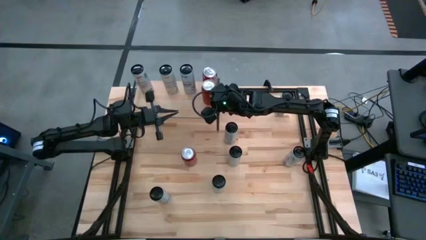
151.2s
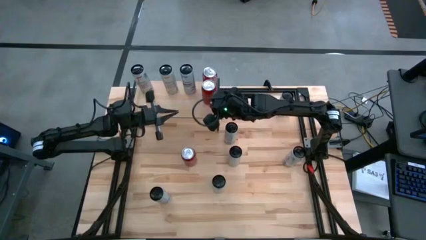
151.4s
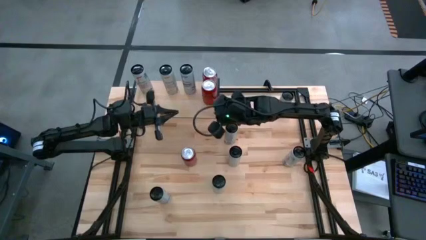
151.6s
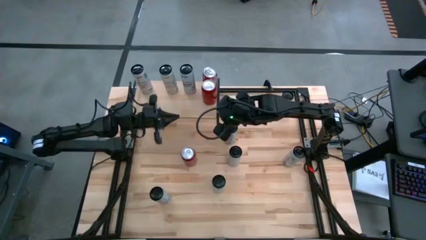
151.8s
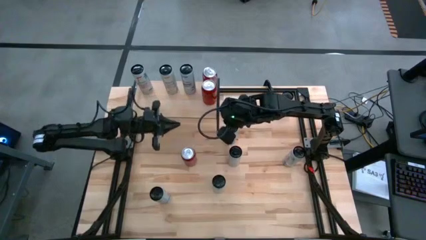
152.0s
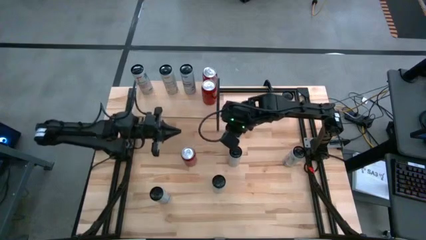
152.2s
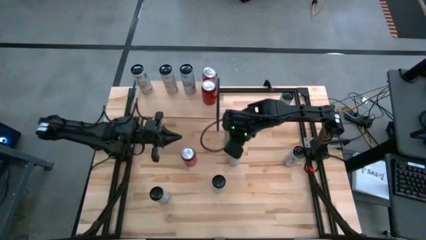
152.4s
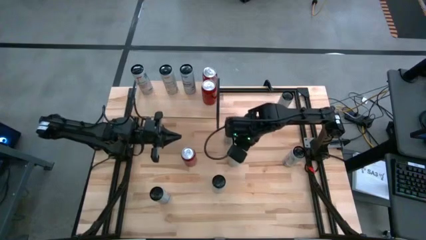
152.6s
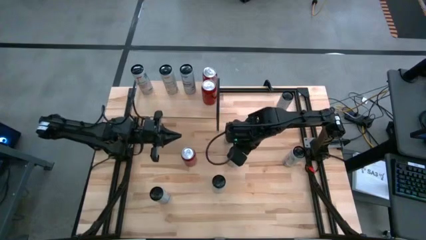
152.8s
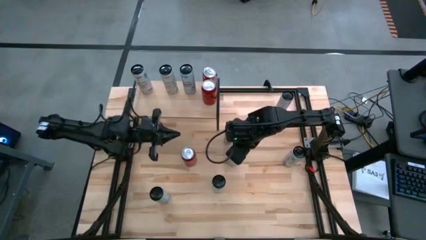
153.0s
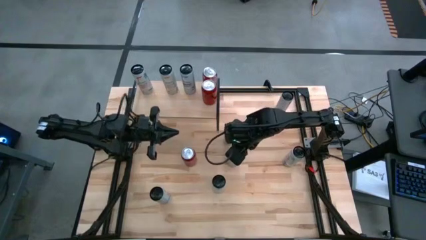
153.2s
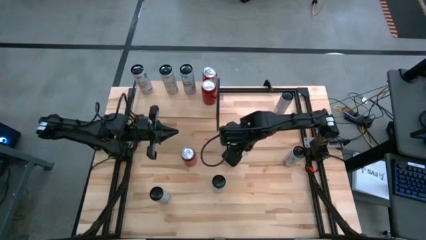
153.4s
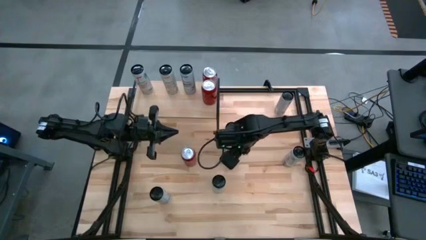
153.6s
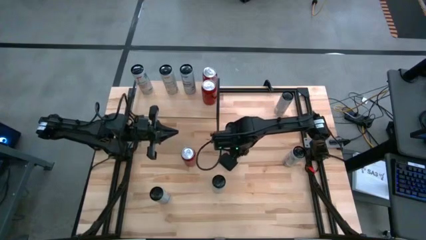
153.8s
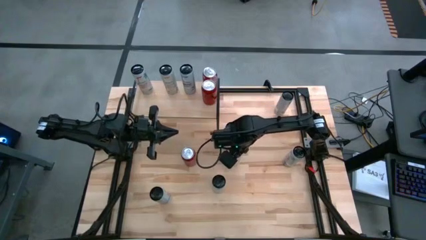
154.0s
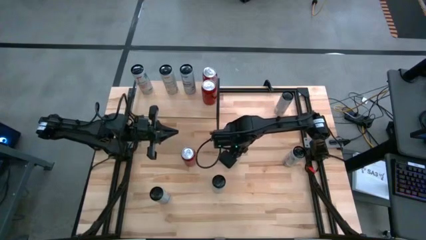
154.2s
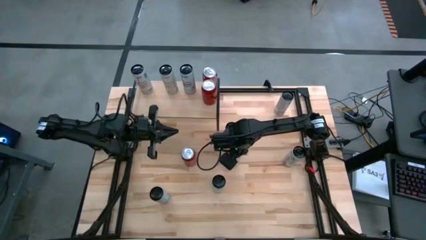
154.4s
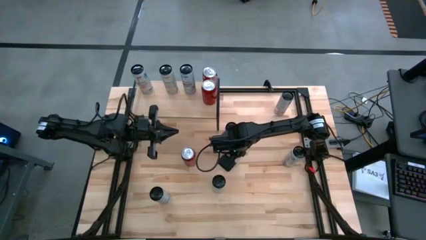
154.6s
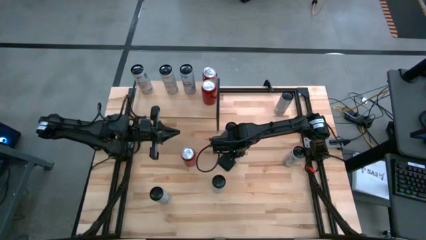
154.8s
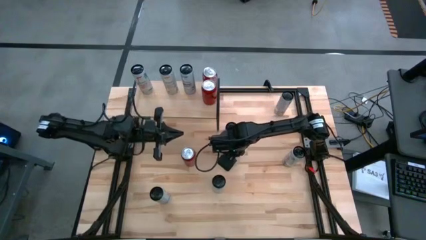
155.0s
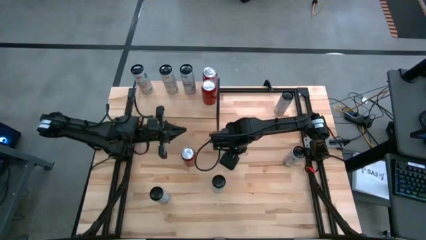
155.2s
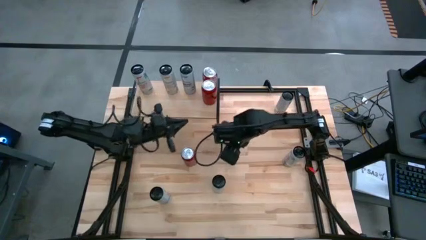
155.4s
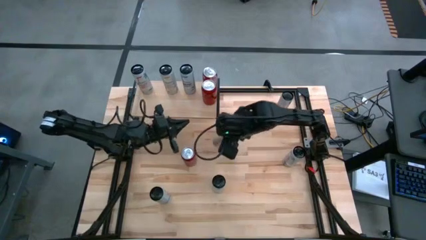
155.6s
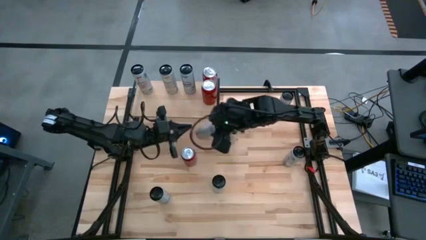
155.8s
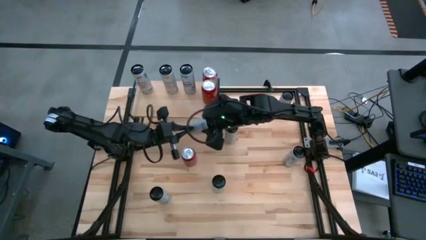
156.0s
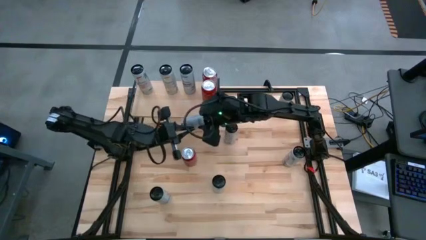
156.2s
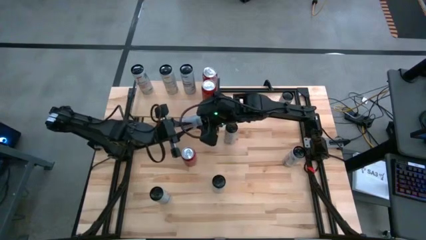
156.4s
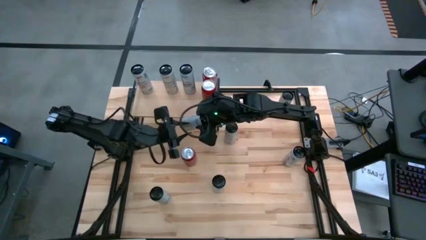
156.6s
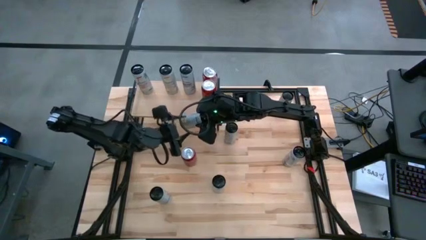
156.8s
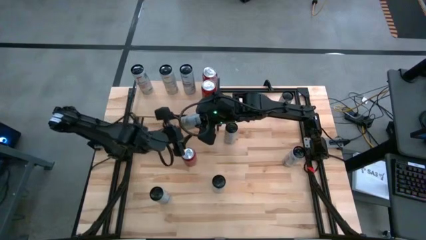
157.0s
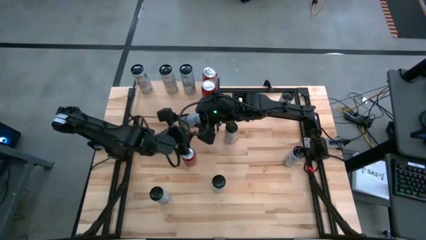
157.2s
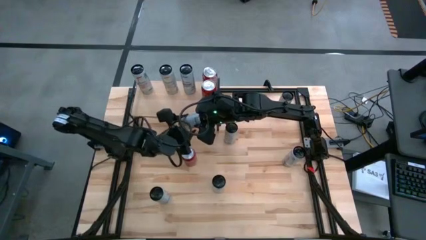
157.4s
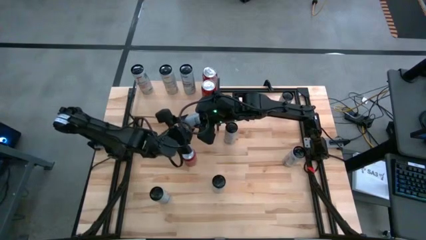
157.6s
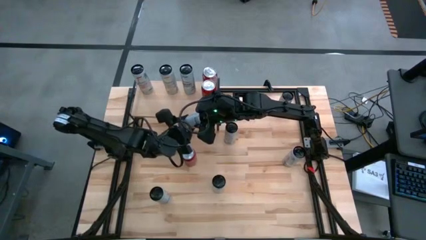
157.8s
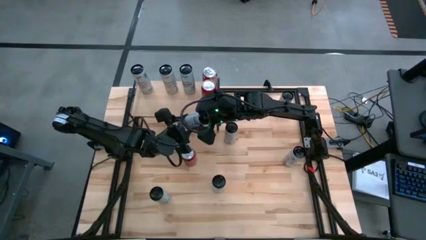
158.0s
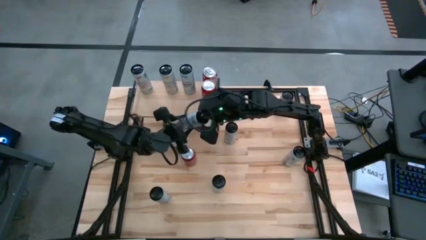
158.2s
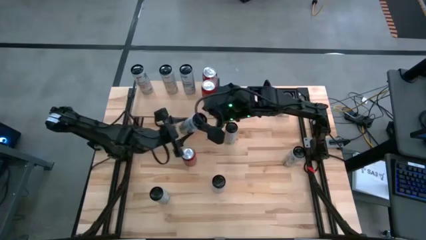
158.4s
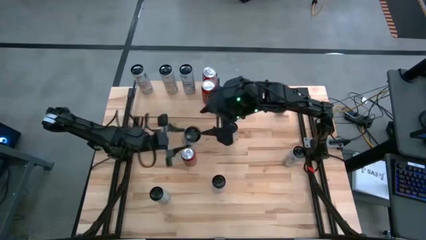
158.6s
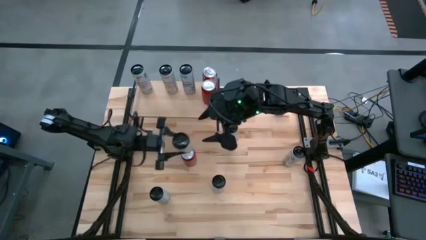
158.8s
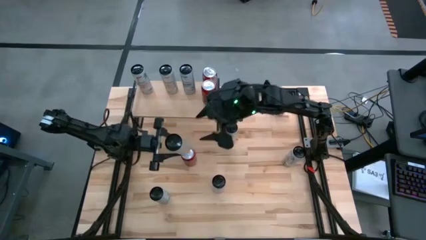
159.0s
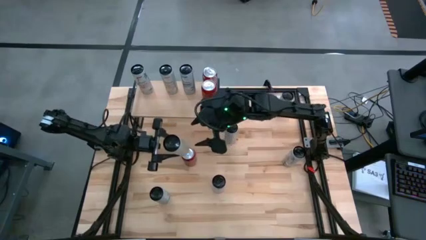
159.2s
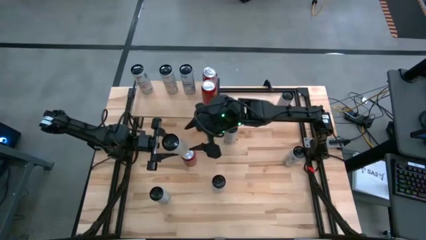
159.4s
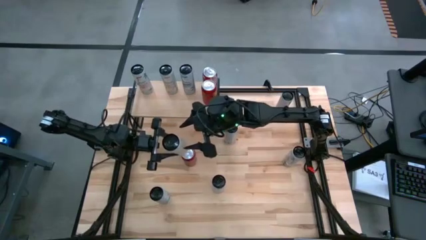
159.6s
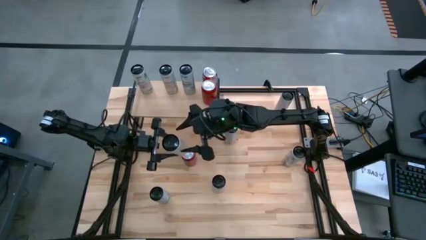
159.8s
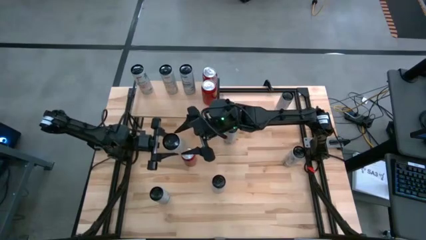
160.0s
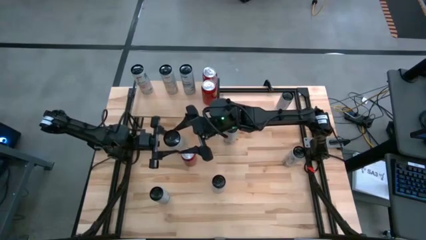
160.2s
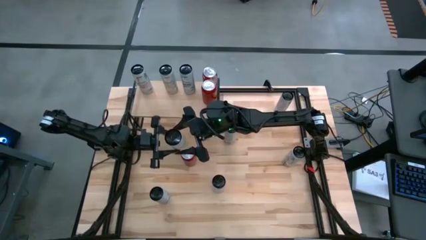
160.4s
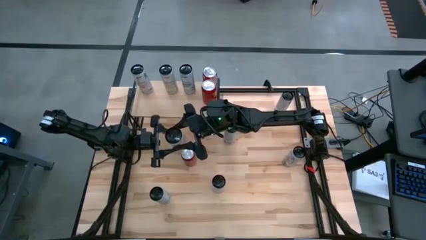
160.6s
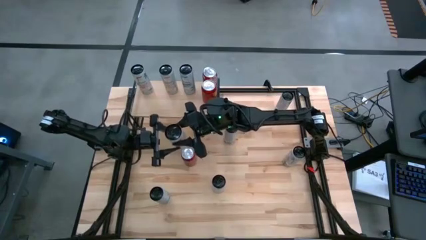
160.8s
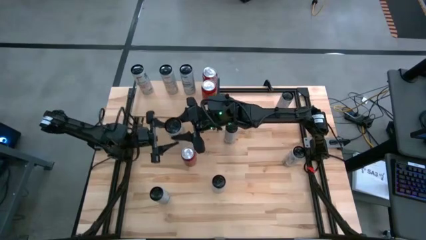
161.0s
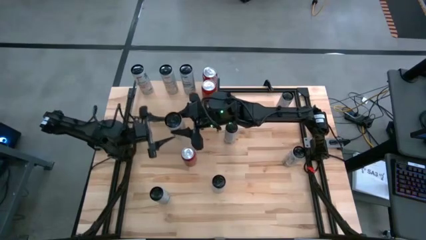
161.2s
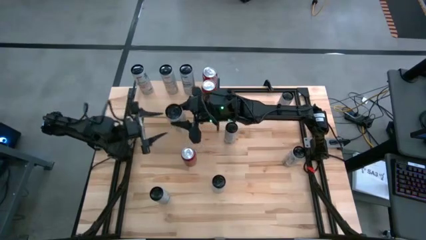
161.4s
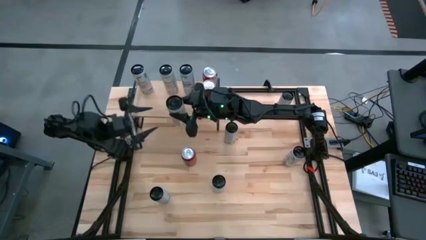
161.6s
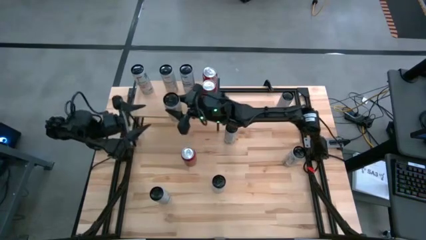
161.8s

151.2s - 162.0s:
Task: Place canned beverage on shelf
Put the bottom white yellow soda can on the shelf aligned with the other white yellow soda can

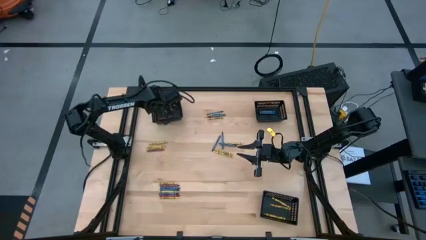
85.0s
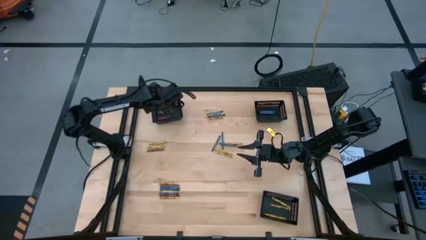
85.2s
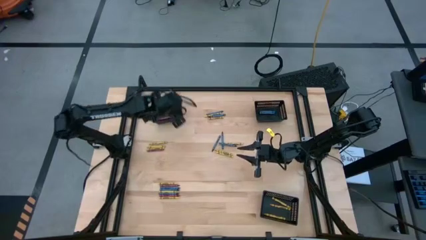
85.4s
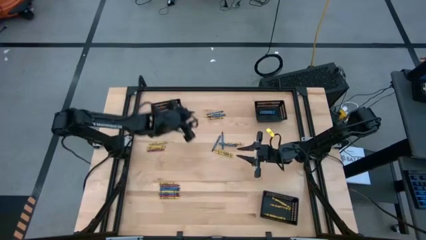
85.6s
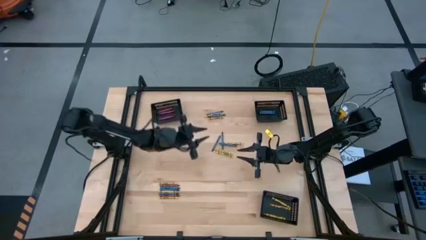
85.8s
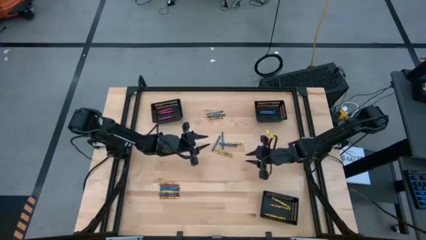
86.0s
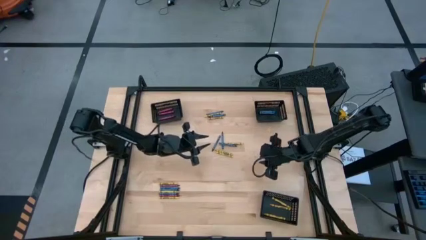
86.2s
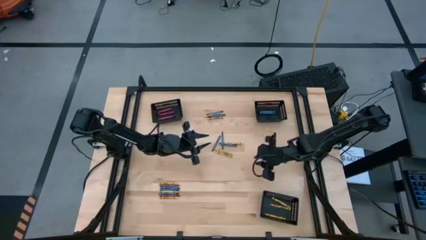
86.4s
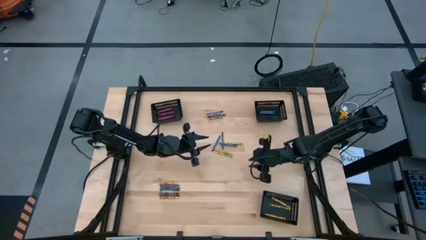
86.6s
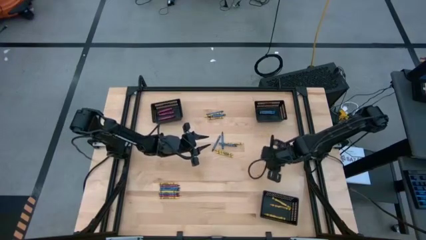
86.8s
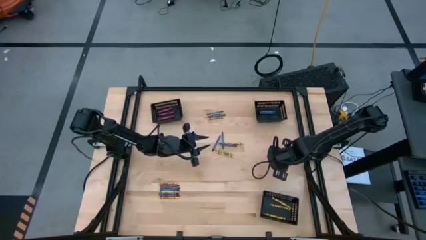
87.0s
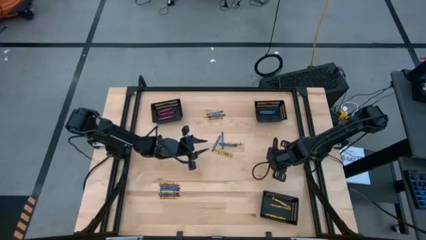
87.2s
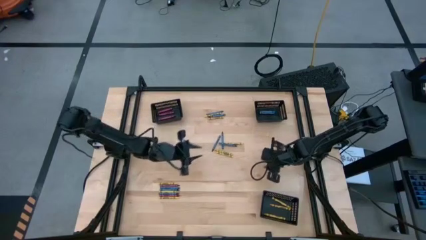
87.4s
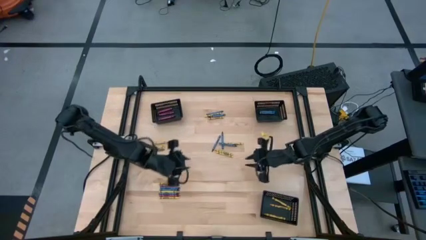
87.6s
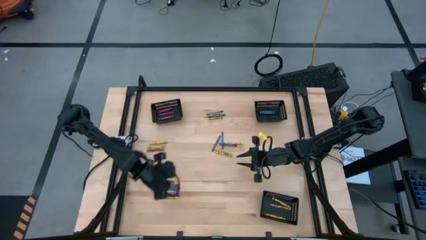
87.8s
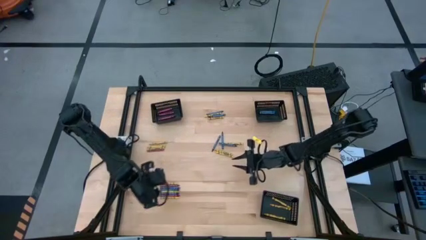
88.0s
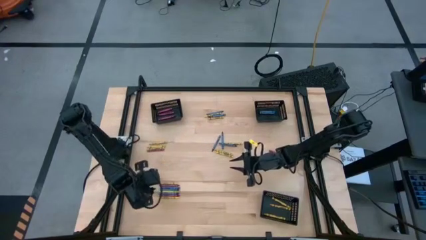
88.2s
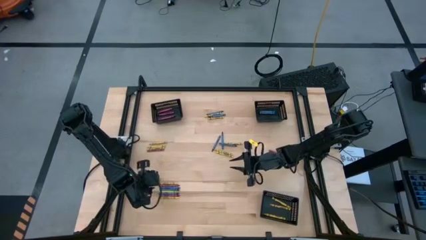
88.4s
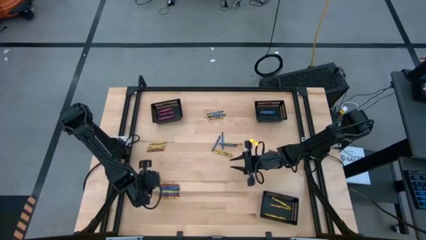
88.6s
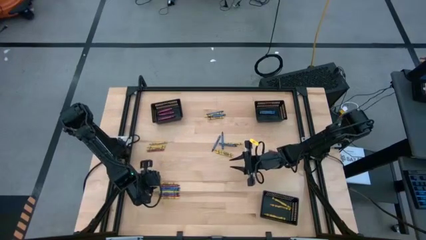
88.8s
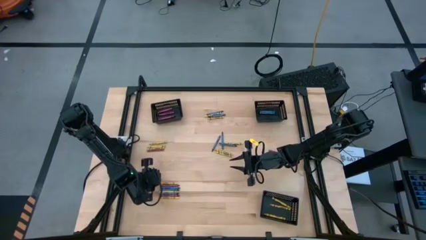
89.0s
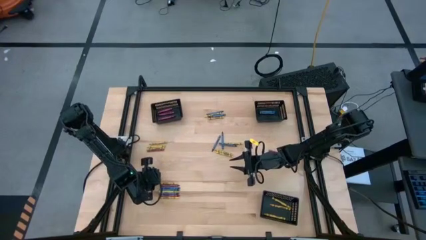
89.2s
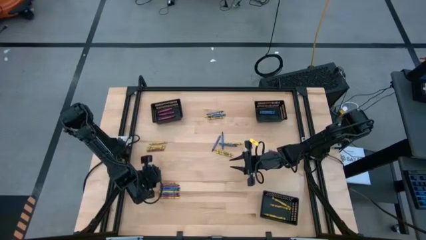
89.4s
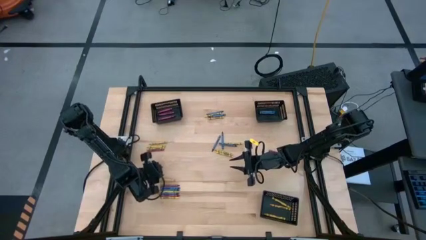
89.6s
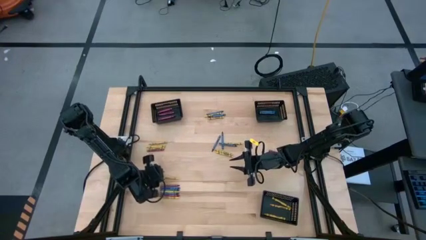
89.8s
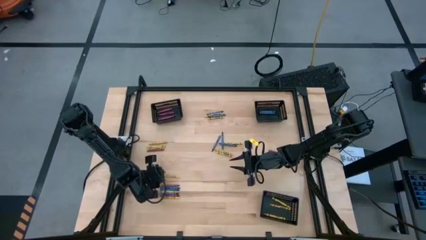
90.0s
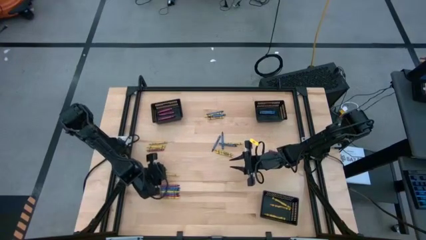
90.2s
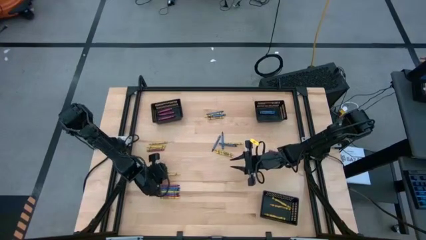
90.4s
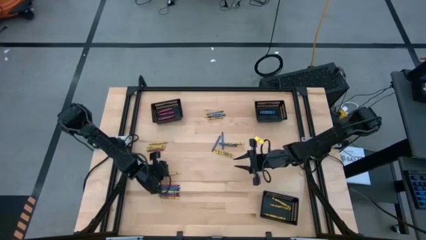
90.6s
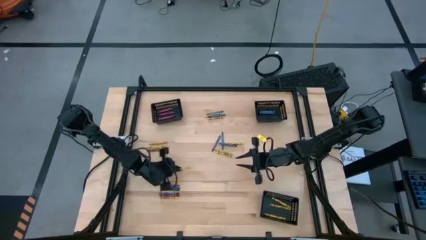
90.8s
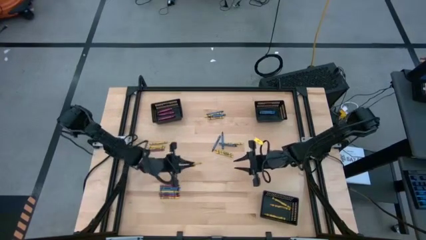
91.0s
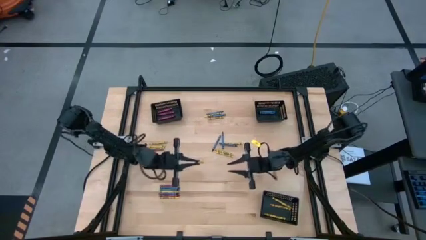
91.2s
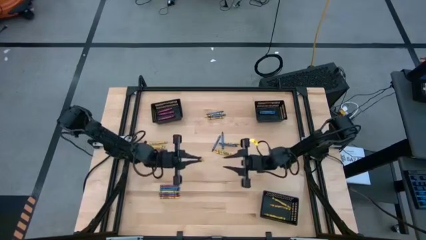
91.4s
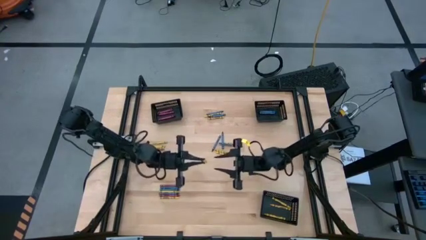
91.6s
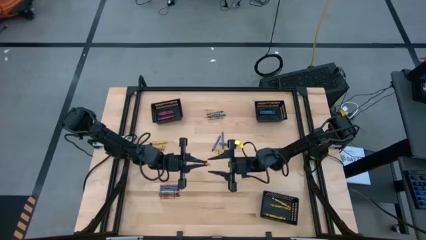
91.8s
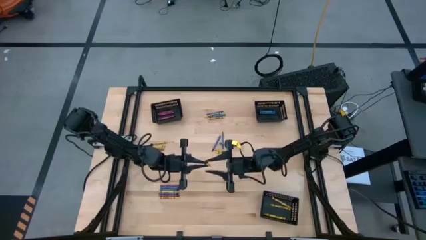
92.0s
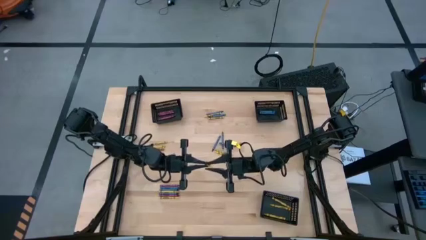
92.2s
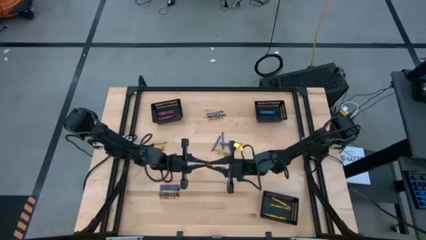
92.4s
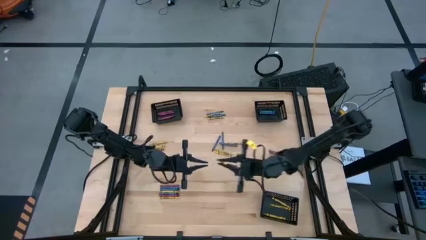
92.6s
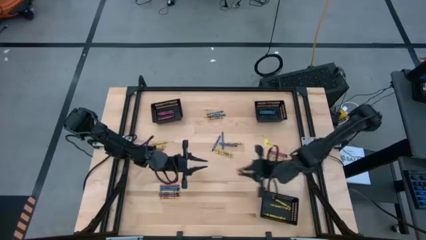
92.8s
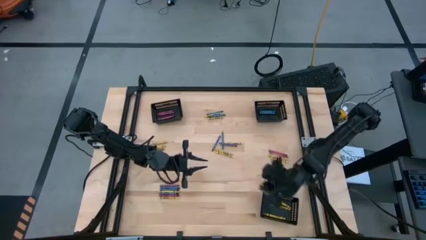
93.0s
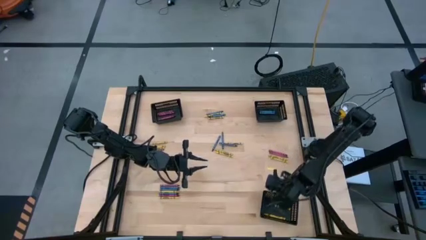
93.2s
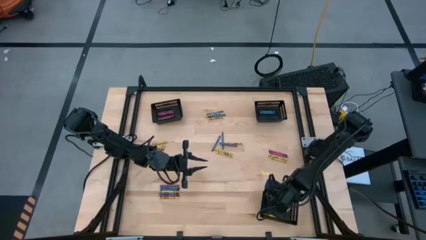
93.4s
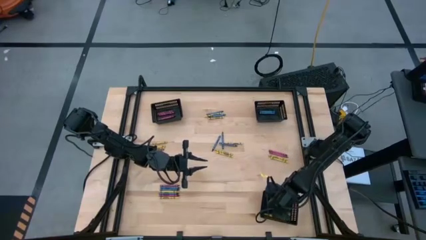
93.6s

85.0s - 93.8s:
Task: Sort crayons
Put the yellow crayon into the bottom black bin
